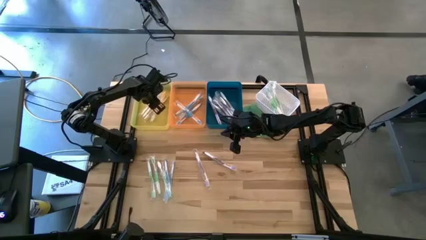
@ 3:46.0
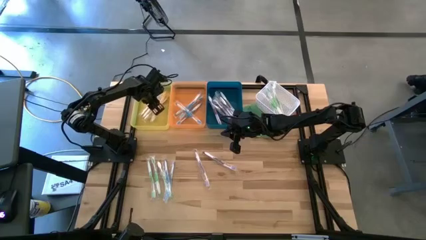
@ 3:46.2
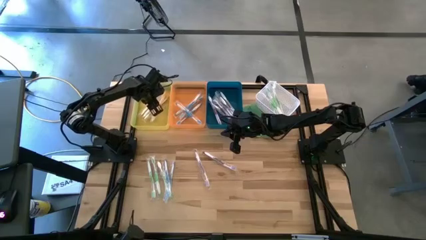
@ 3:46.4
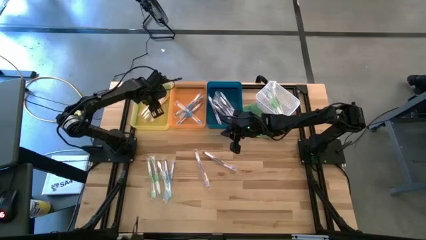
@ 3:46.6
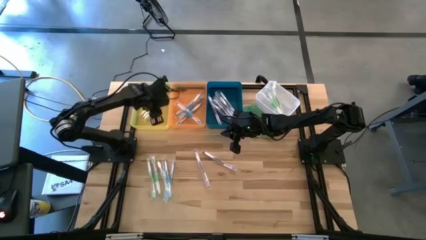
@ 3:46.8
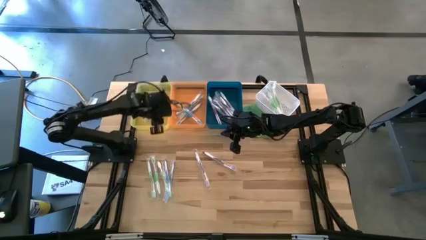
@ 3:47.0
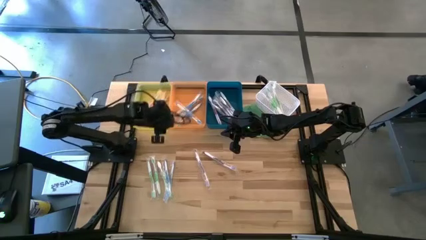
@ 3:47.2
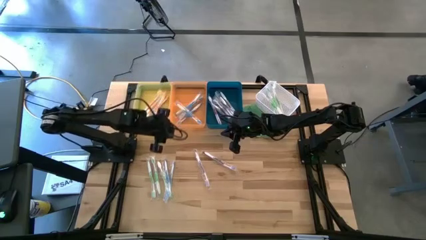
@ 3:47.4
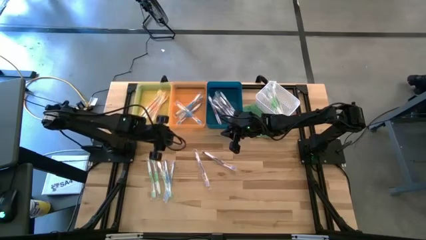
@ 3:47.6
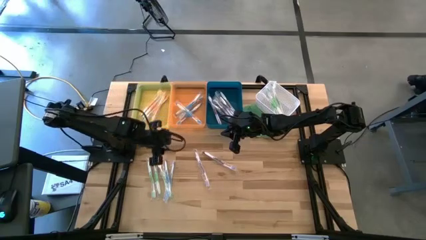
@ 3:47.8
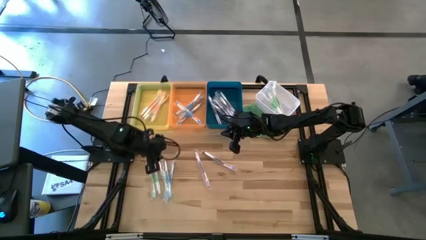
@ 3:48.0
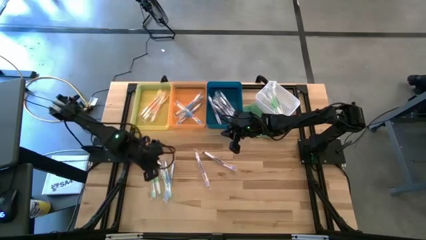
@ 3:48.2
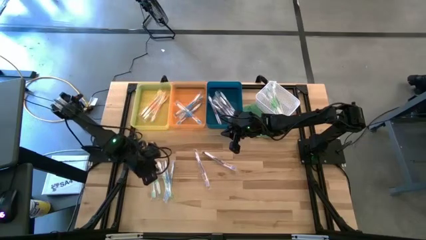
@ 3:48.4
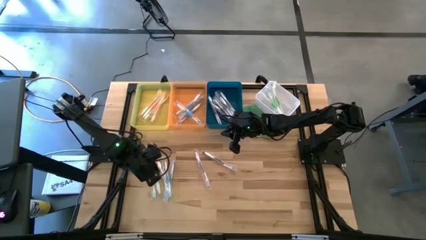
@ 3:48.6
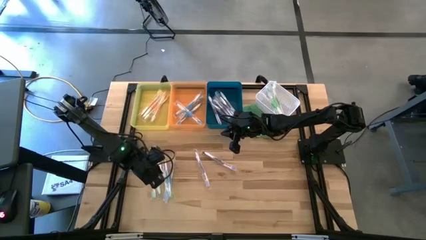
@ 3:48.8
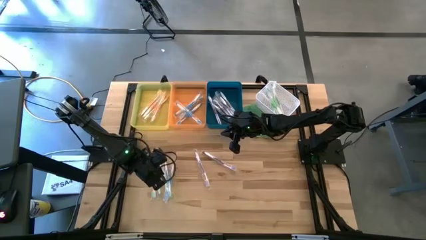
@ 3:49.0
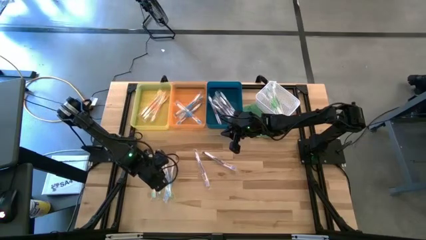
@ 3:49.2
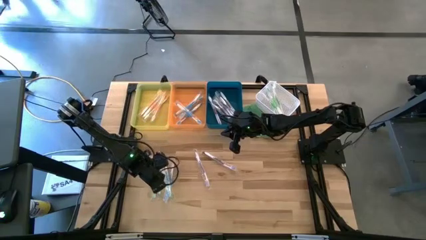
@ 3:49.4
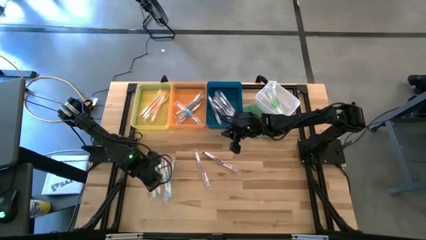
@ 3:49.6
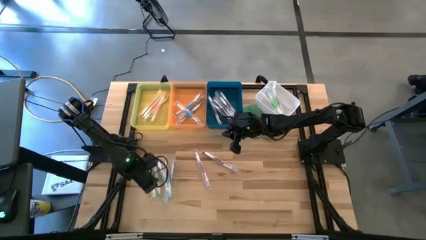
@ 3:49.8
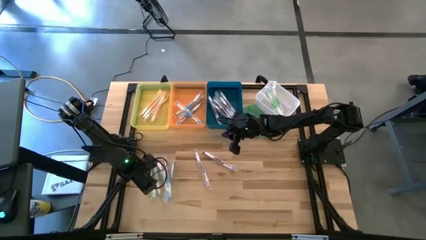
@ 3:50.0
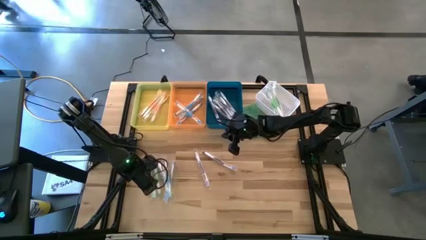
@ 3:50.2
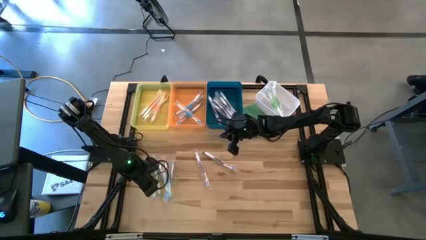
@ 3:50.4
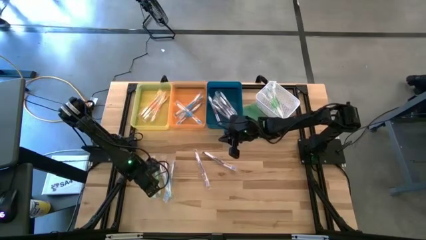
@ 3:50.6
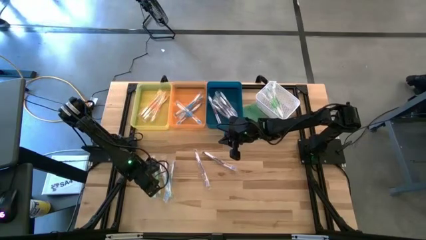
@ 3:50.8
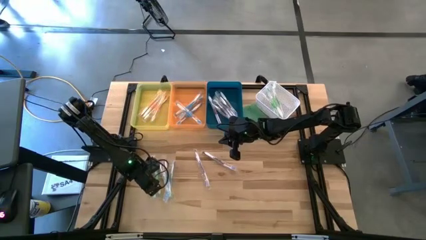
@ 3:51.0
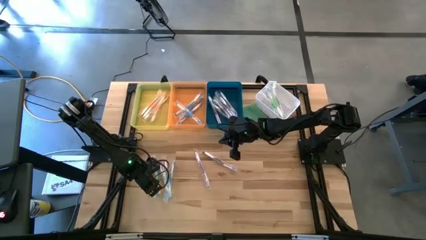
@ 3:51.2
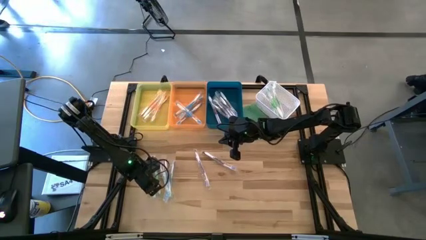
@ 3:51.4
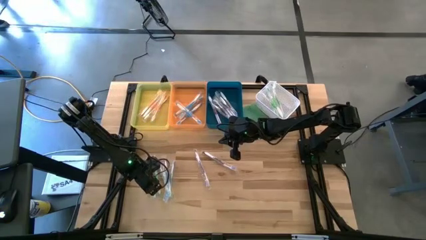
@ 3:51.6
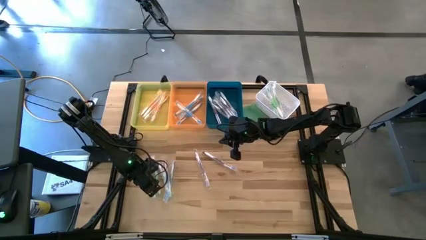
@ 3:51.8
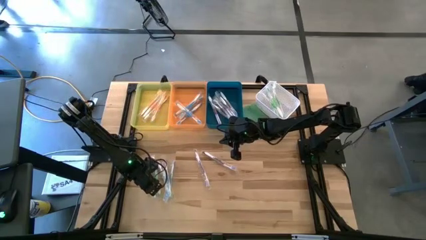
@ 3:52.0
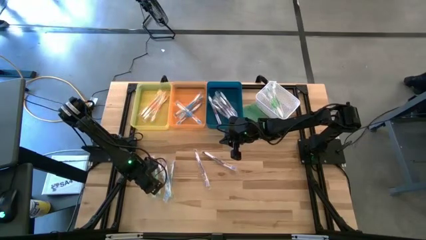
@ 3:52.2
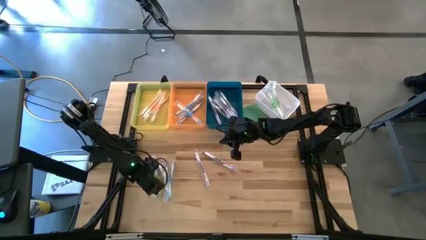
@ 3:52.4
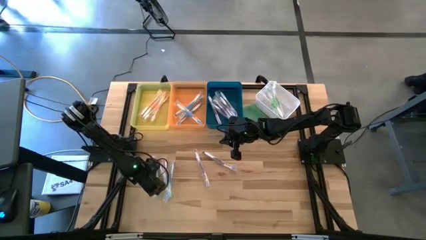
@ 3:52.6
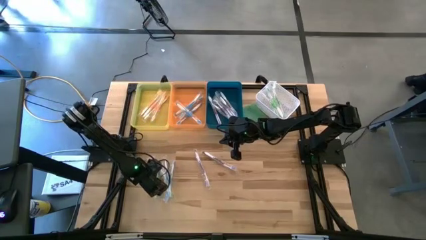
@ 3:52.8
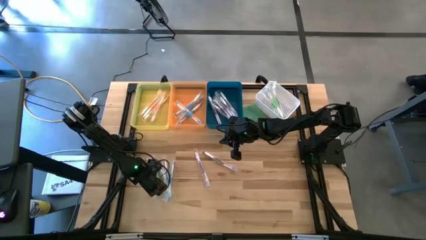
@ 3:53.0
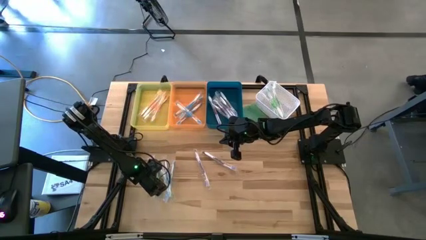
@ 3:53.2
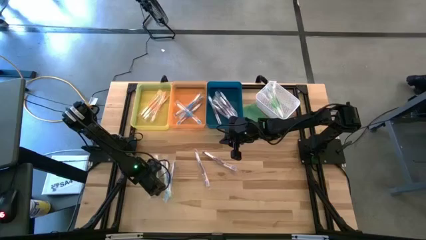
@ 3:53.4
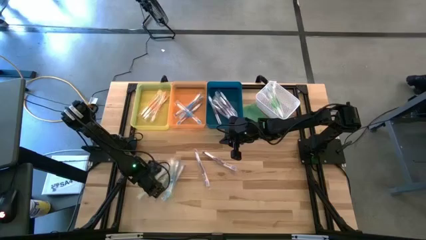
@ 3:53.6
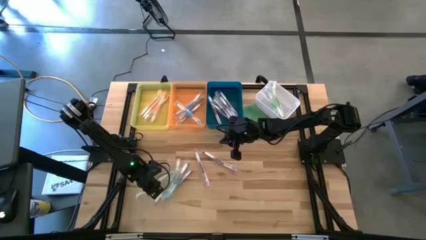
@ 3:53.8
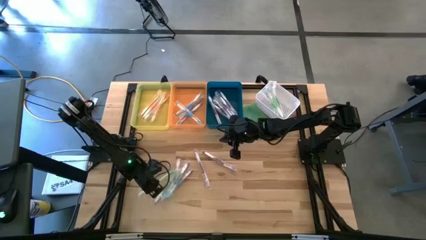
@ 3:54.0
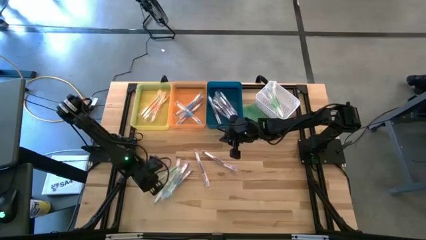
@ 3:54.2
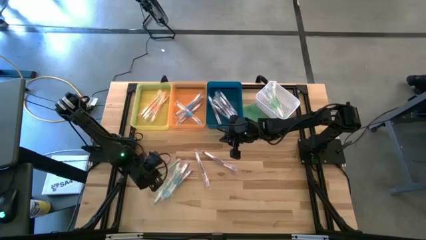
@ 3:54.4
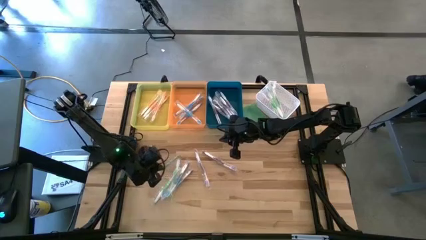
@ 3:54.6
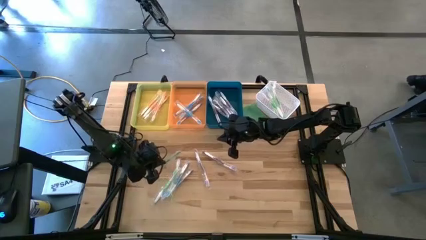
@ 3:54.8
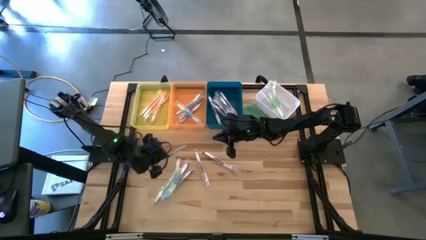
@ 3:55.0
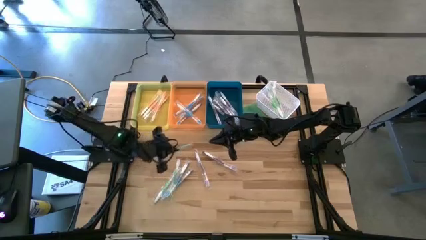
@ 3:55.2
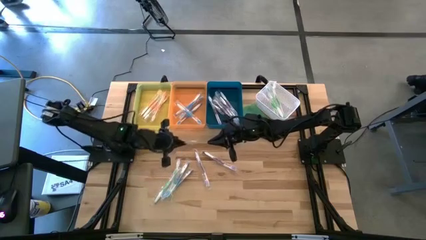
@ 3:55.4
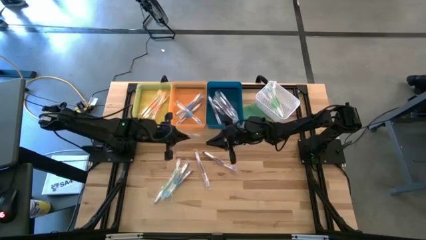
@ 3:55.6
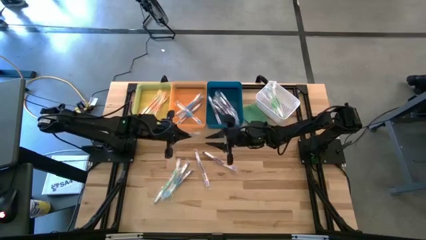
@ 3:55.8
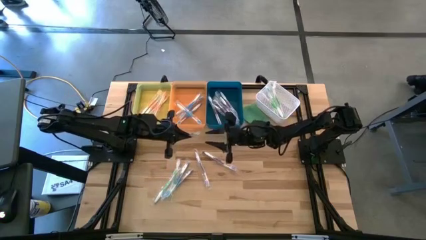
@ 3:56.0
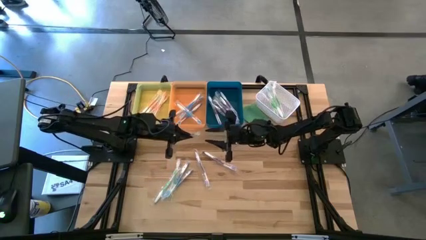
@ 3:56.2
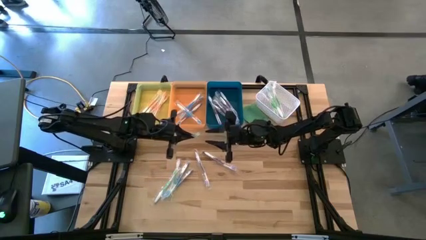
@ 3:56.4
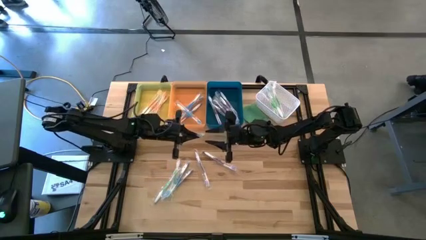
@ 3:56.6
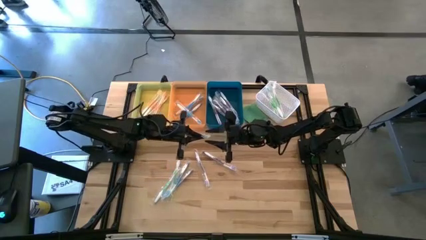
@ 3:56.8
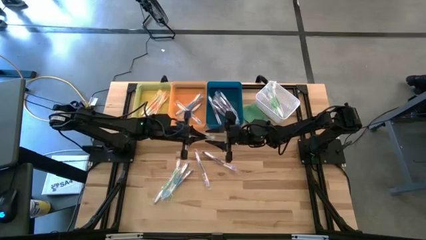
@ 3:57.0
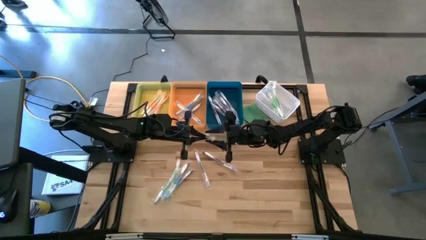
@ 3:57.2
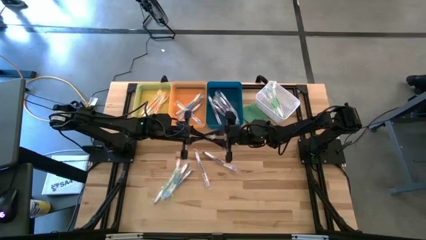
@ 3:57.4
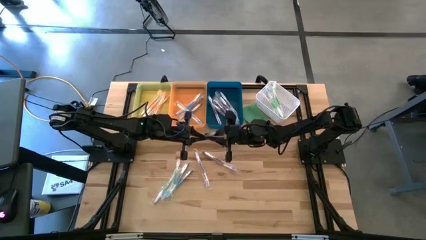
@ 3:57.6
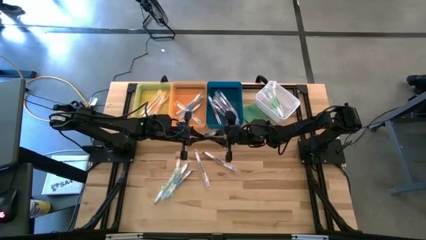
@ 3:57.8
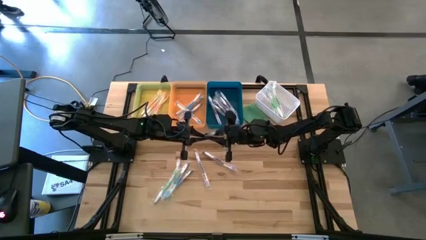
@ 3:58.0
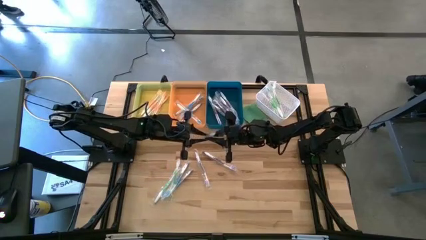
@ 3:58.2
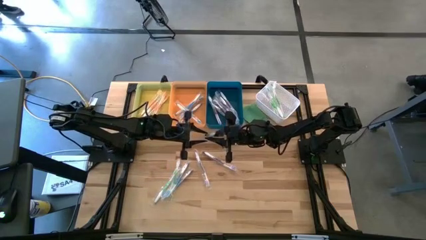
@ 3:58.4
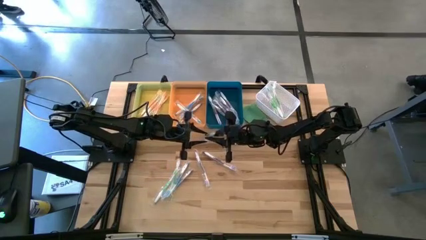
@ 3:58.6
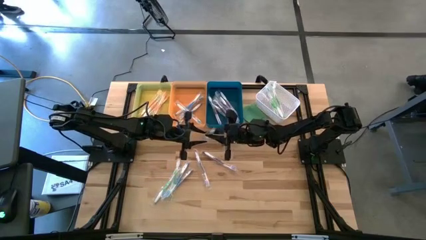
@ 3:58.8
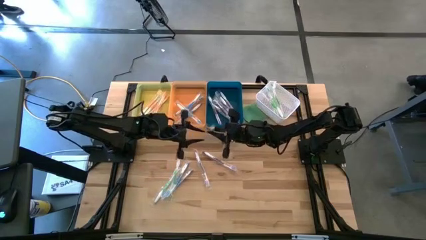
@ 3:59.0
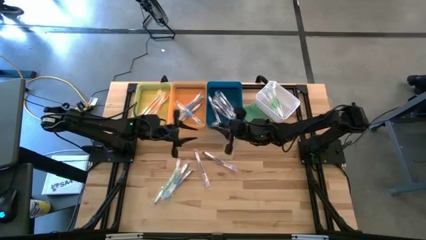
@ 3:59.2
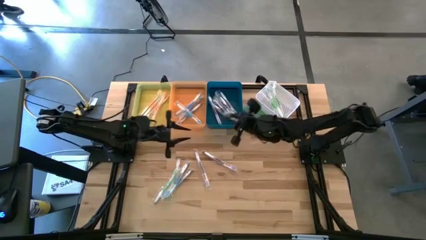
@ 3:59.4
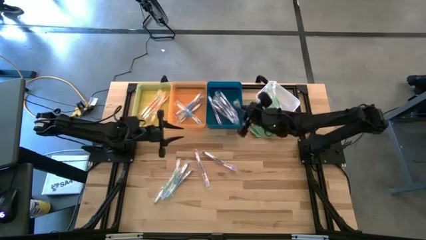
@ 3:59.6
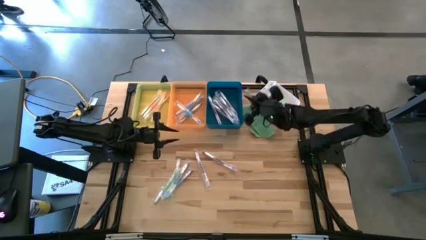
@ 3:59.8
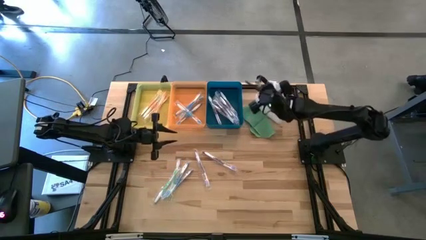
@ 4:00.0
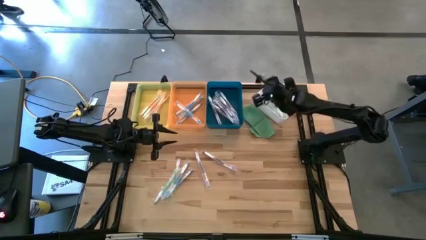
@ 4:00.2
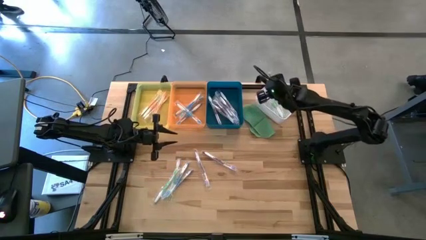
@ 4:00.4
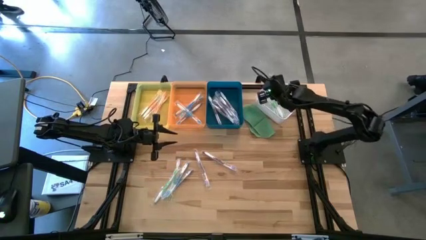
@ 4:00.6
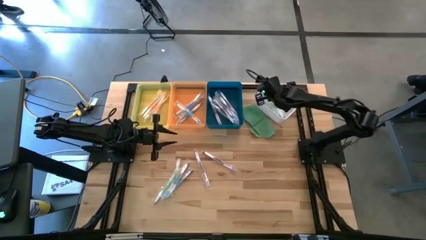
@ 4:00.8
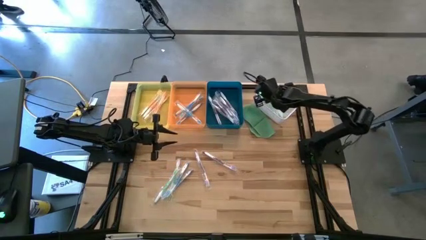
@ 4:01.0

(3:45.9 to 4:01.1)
Task: Pick & Place Toothbrushes
Put the green toothbrush into the white bin

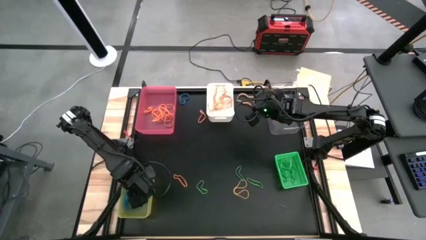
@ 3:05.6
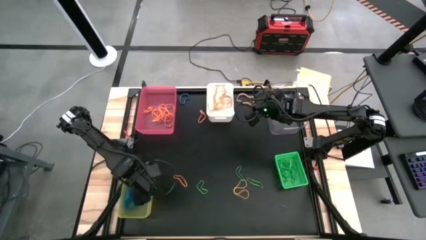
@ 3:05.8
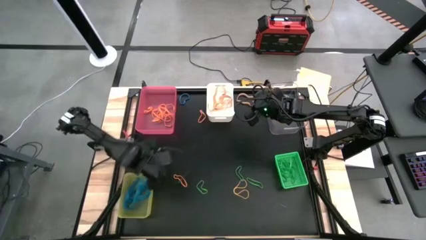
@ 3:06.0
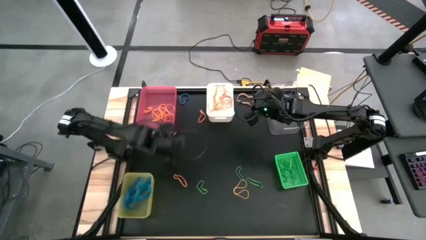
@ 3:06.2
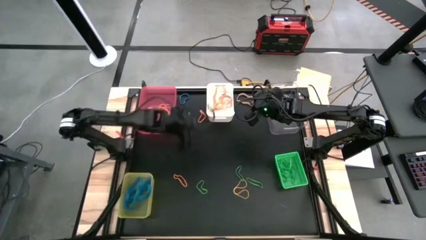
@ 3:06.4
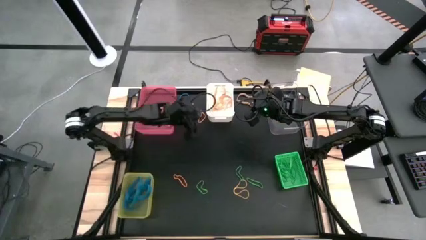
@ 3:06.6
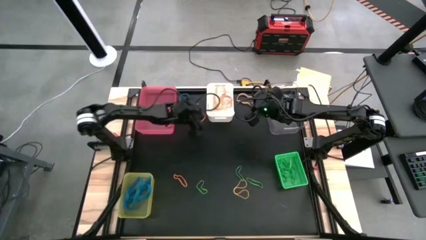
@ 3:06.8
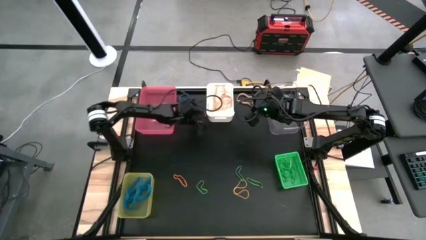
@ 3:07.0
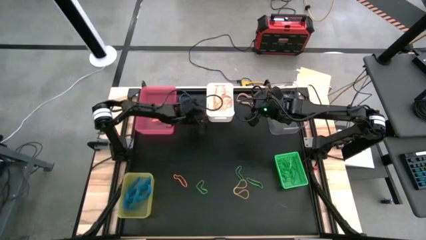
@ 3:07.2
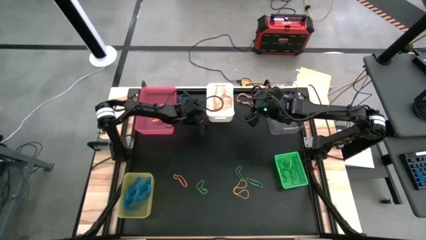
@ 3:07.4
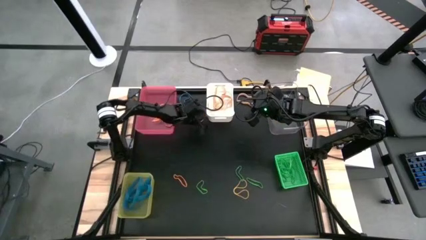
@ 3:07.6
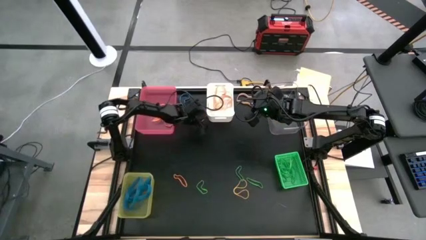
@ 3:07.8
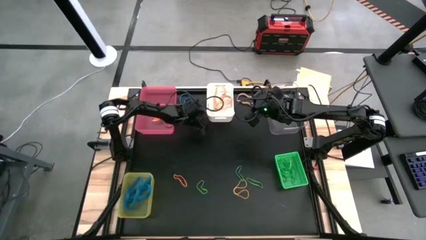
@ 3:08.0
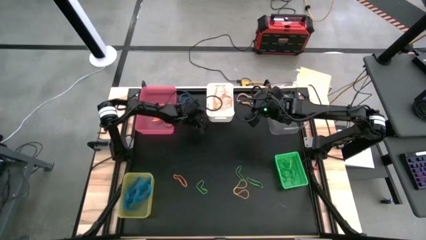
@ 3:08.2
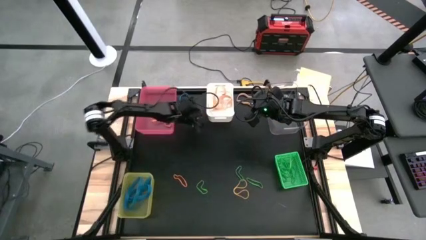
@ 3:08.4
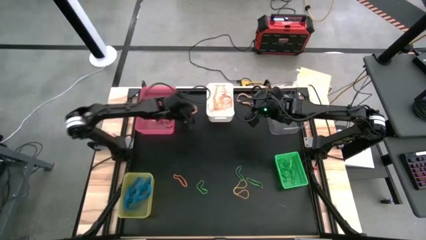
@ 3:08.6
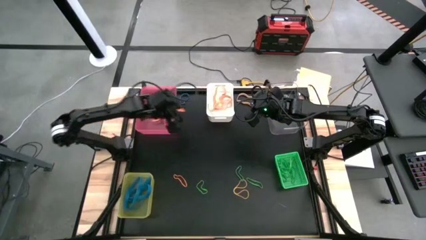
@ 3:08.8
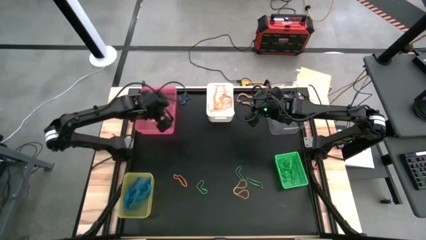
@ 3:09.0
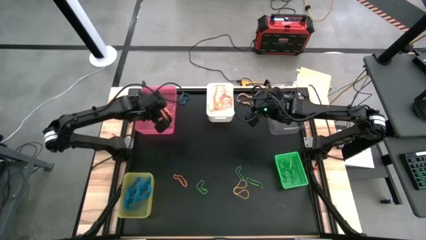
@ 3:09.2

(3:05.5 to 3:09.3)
Task: Sort rubber bands into baskets
Put the orange rubber band into the pink bin
